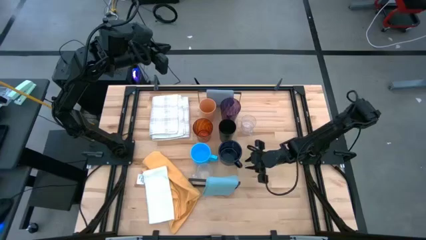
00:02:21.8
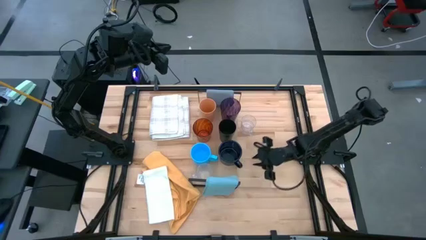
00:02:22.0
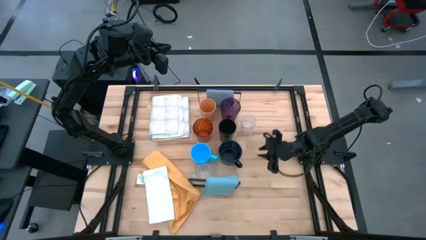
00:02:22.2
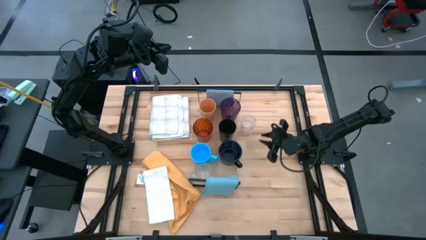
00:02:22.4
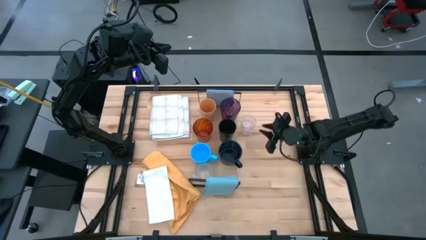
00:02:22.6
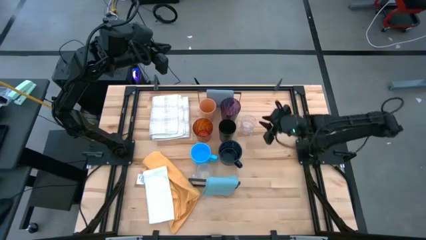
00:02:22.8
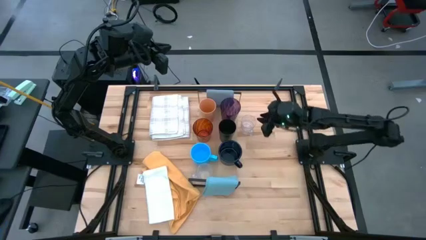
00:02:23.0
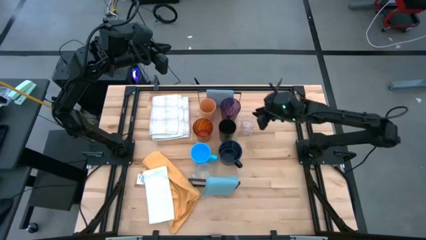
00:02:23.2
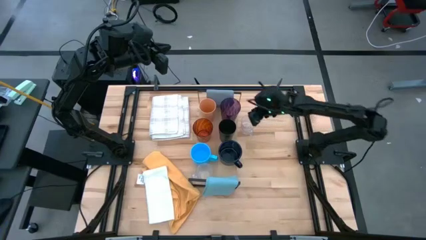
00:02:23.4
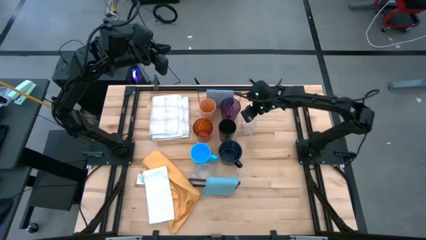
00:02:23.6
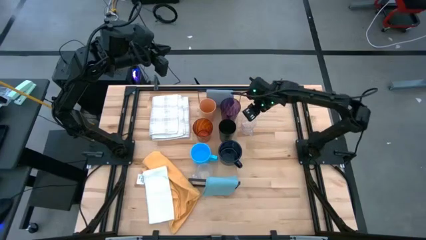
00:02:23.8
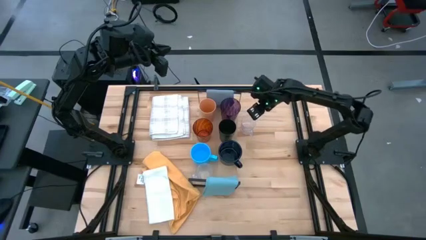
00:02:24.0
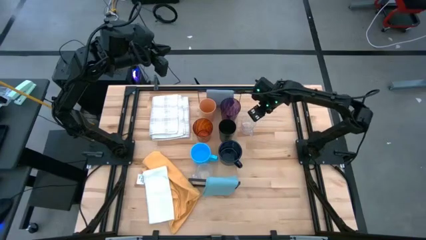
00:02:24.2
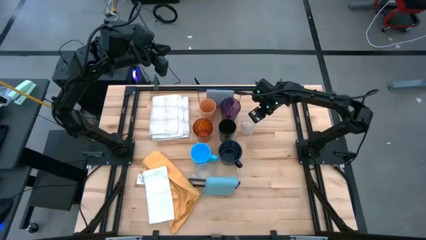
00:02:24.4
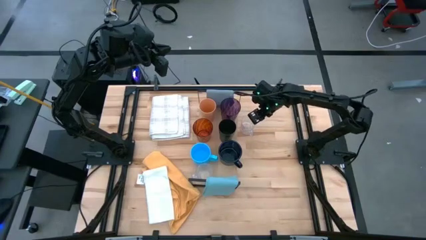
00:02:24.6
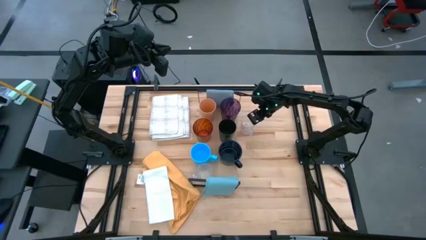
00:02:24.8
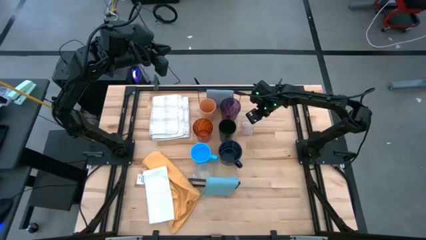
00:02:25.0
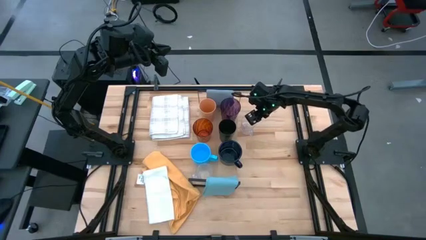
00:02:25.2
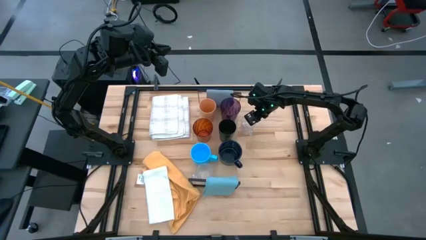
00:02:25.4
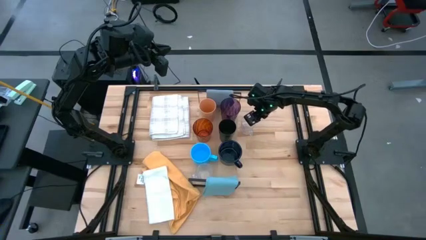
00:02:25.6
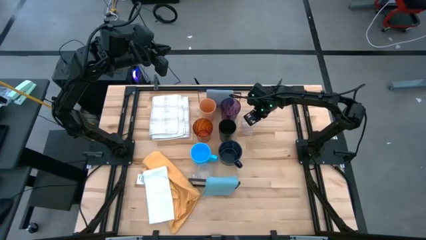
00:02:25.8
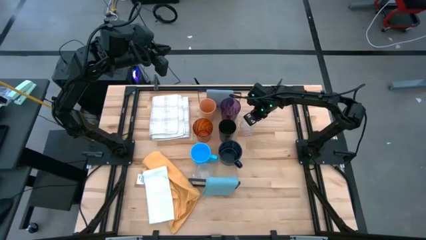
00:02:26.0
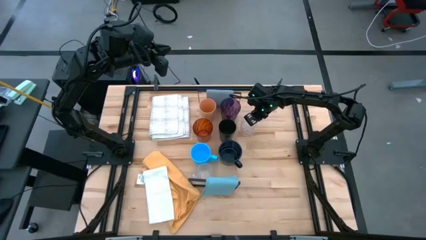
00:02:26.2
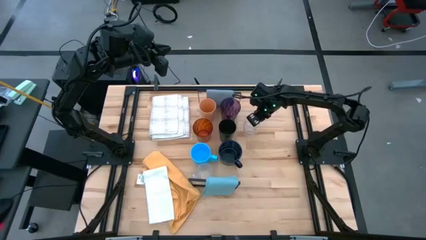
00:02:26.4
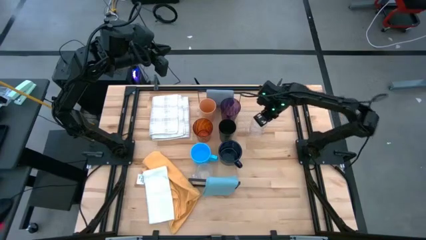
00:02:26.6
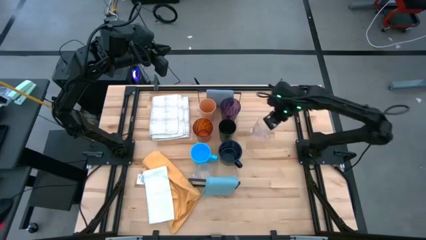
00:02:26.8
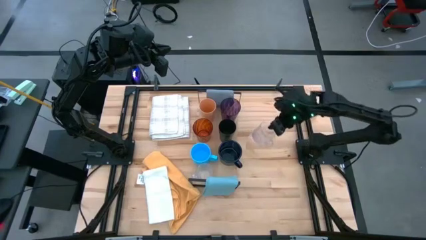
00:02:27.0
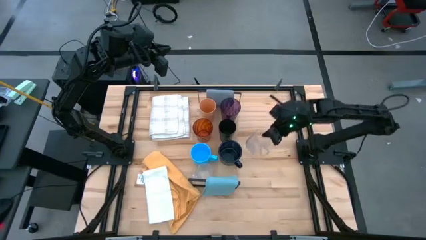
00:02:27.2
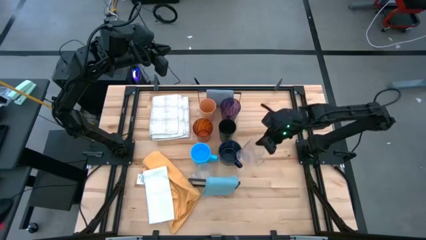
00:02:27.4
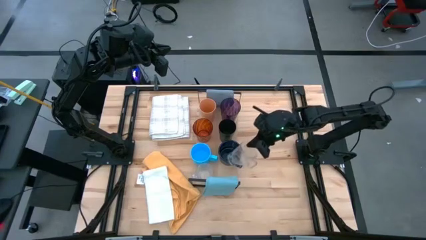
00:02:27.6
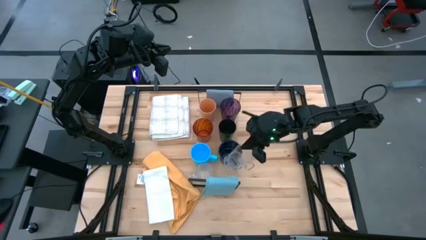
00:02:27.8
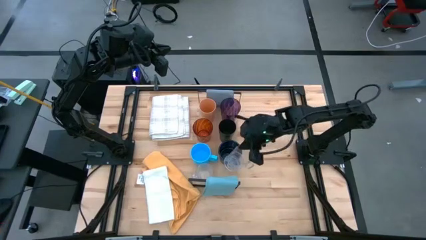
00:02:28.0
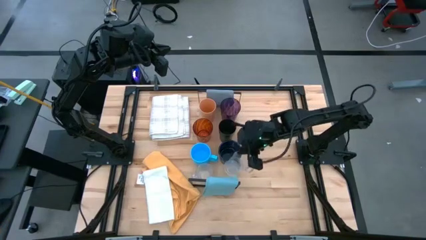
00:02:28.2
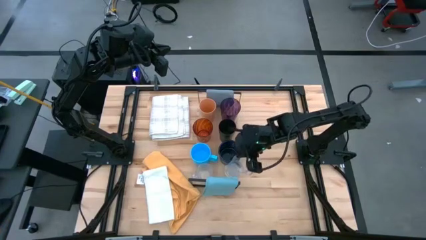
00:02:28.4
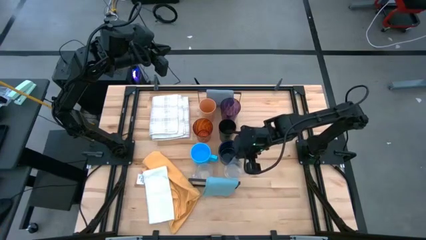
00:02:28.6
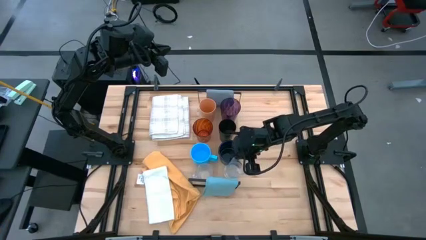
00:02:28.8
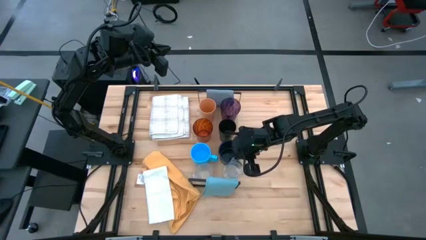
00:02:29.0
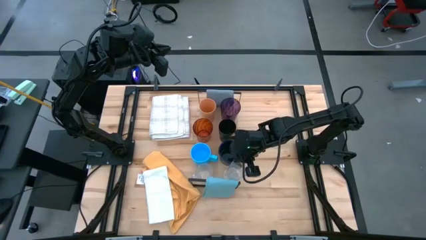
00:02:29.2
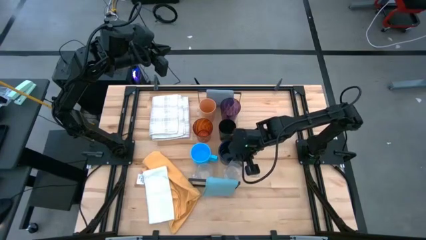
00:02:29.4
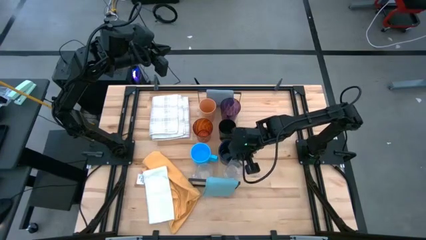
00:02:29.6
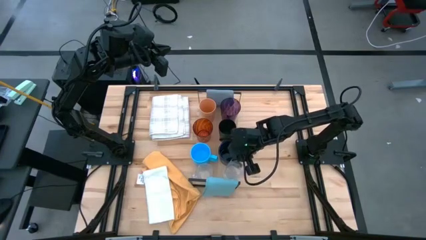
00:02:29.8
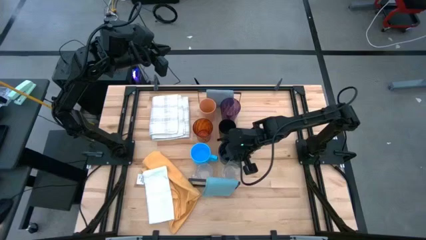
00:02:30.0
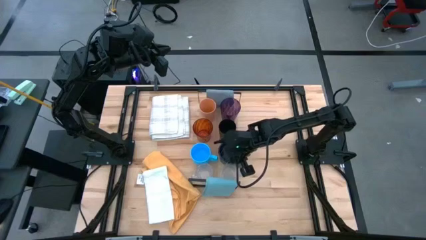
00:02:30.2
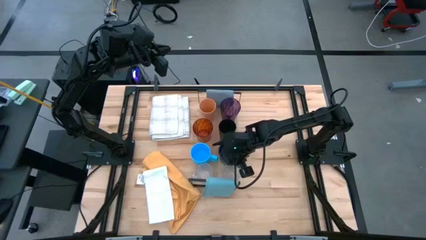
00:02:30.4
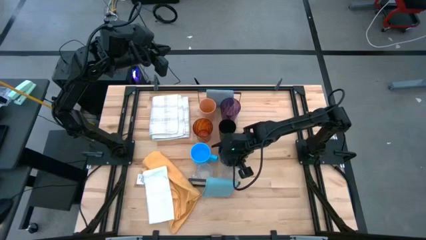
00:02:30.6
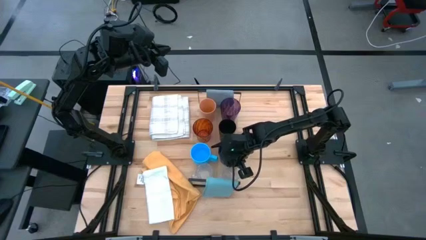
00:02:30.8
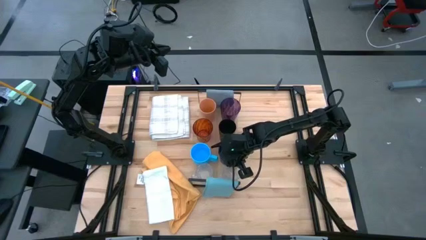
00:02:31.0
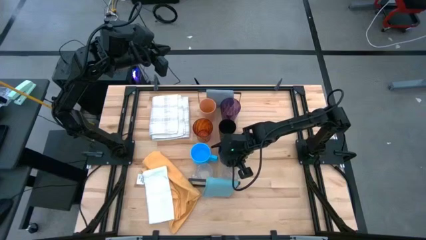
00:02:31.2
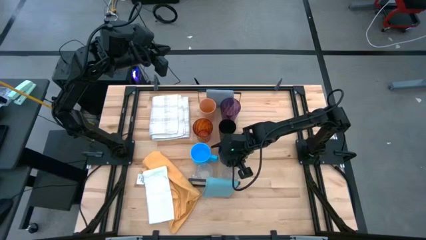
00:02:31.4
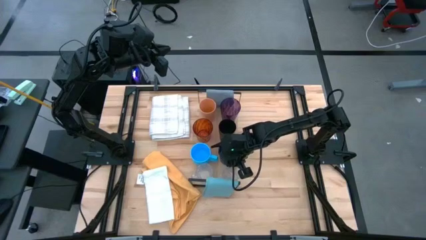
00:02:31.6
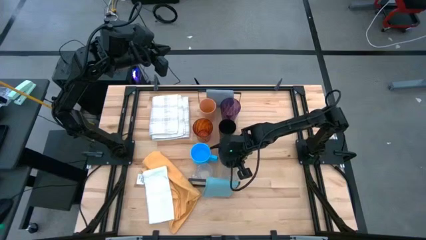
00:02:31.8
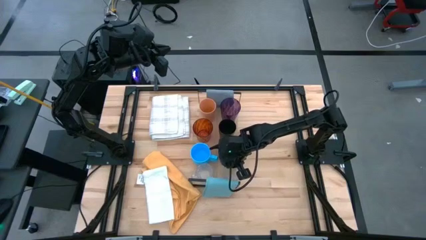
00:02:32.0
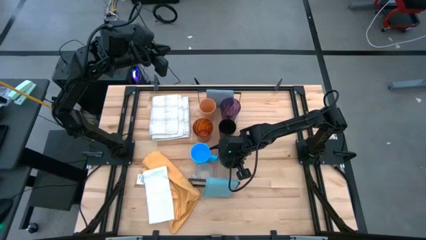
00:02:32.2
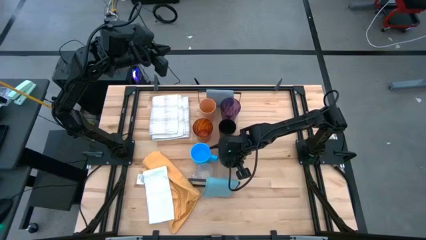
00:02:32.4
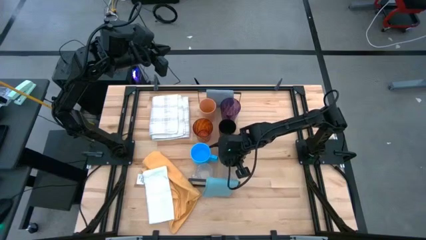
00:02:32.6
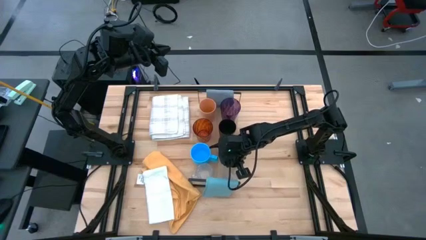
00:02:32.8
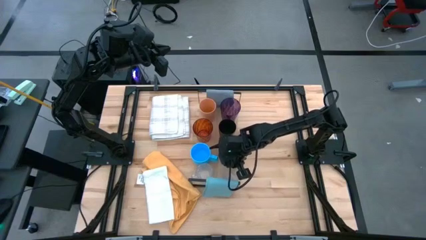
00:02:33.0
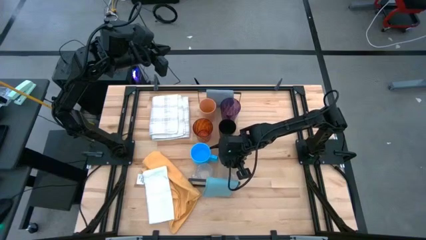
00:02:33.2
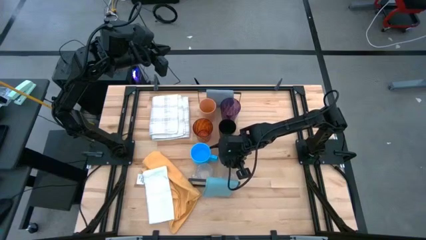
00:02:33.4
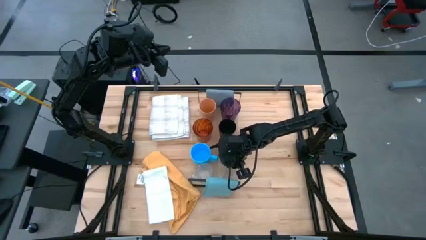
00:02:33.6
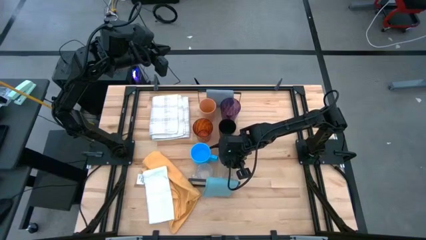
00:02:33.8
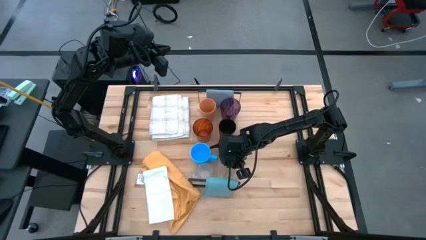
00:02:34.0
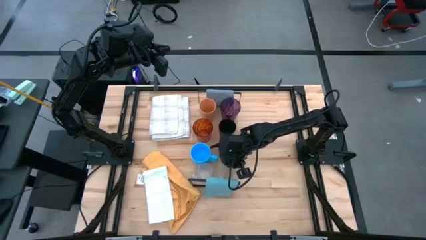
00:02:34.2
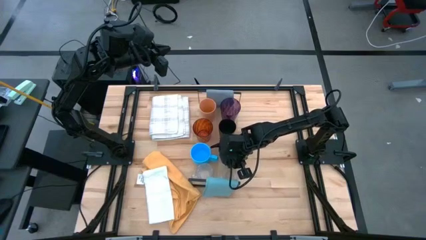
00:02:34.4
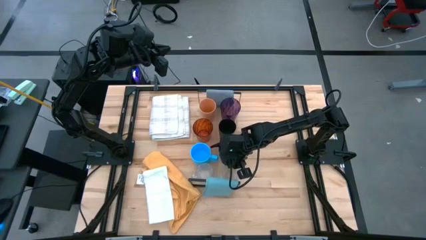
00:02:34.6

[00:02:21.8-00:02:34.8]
Task: Stack small to large cups/mugs on shelf
Put the transparent mug on the shelf

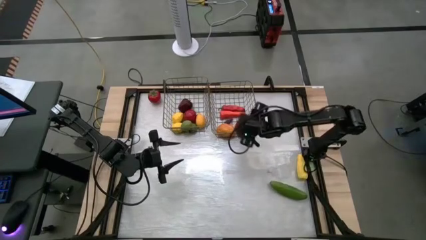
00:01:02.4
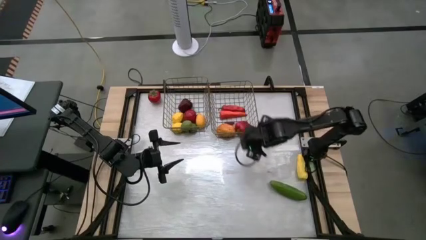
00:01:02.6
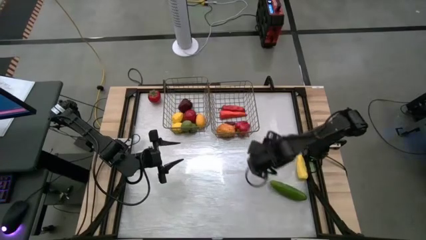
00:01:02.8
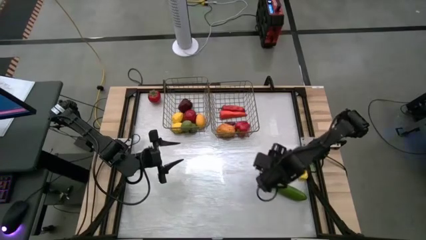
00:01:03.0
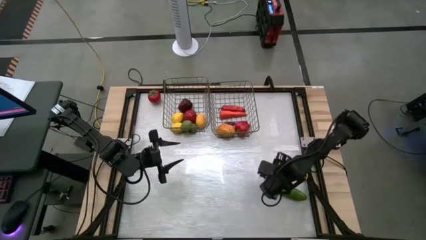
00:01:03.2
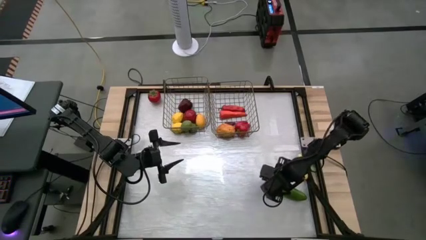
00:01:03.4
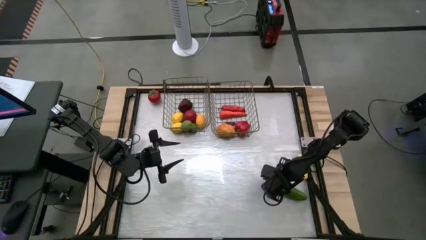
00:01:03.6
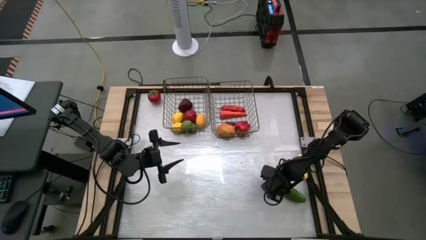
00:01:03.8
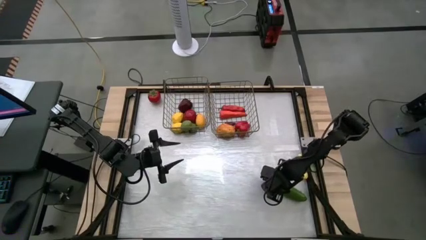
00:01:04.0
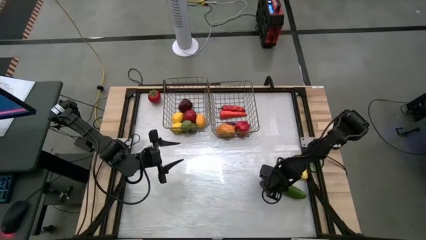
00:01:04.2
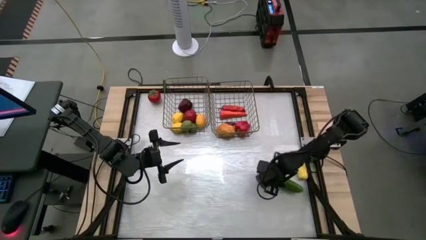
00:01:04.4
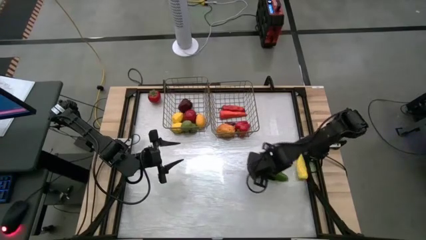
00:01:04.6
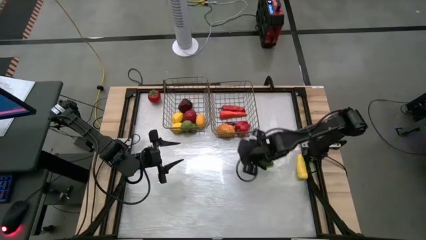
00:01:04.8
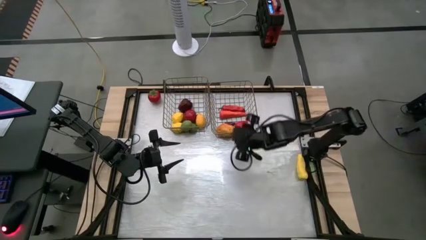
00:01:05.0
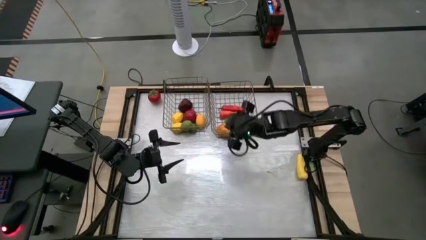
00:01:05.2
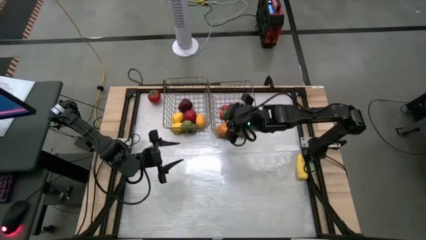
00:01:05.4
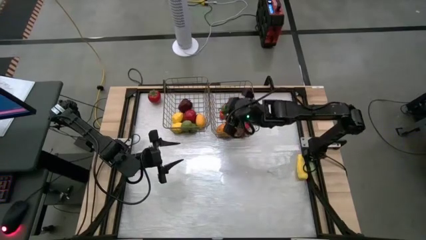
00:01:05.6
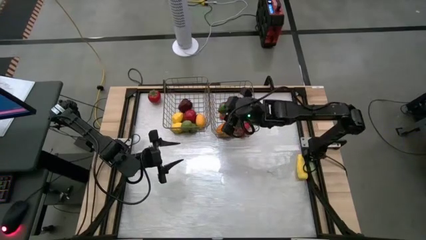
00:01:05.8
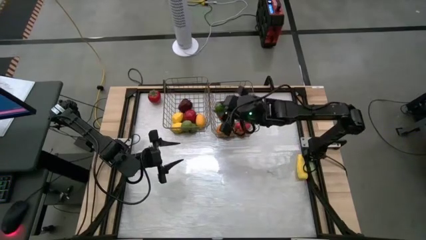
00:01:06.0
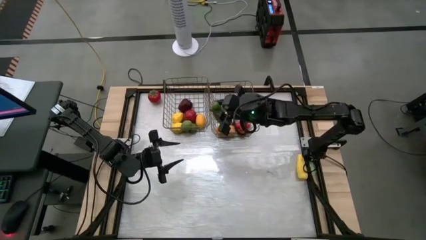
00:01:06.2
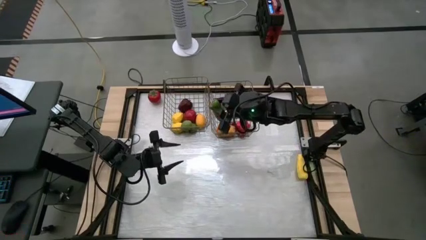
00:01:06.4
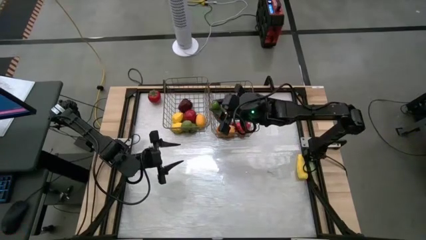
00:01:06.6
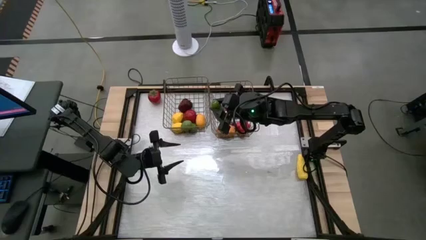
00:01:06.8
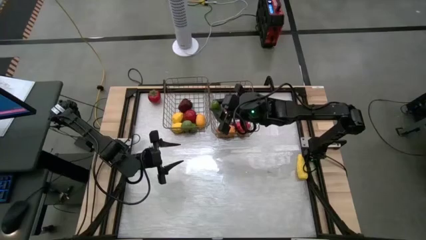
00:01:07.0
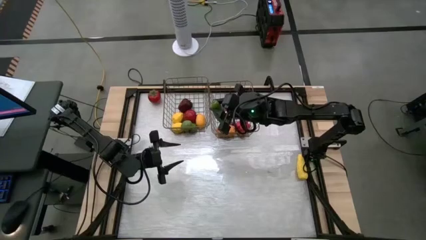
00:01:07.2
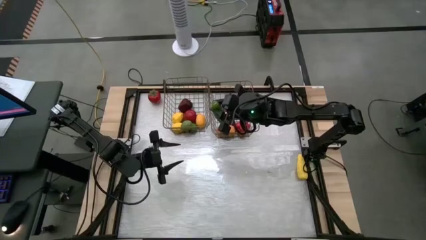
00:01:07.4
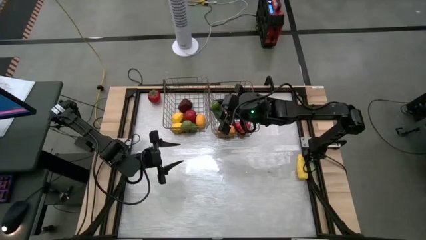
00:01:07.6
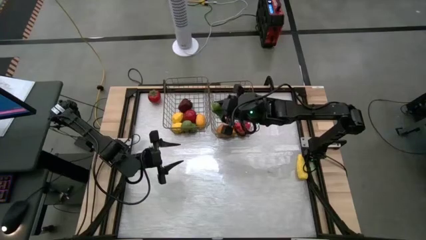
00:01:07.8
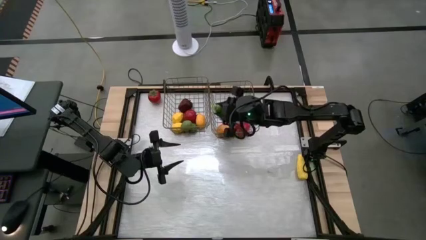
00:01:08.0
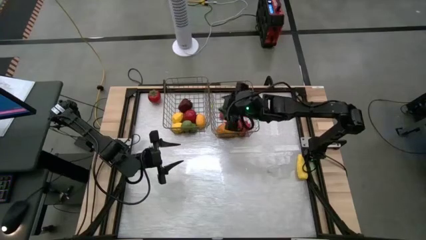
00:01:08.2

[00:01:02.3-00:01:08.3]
Task: Sort produce into baskets
Put the cucumber into the right wire basket
